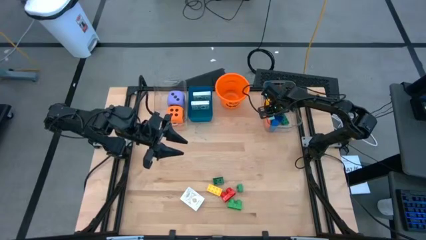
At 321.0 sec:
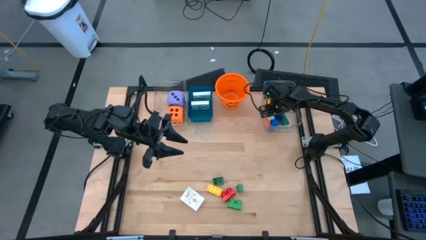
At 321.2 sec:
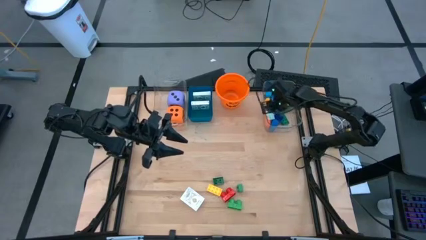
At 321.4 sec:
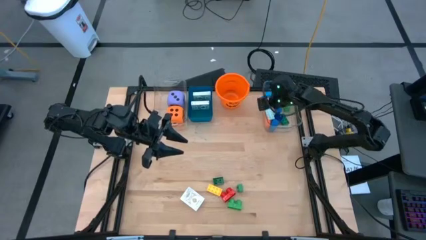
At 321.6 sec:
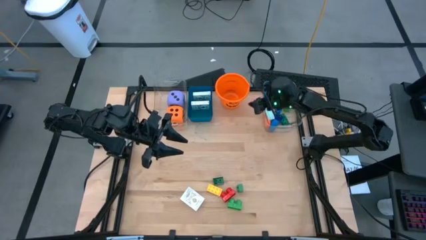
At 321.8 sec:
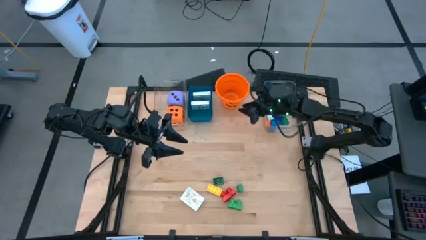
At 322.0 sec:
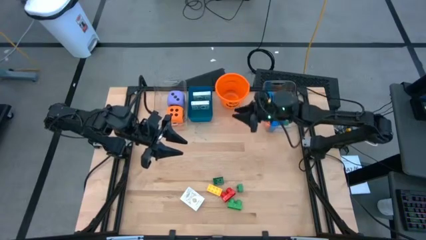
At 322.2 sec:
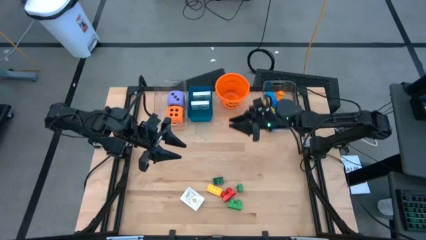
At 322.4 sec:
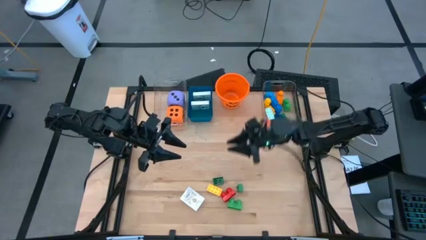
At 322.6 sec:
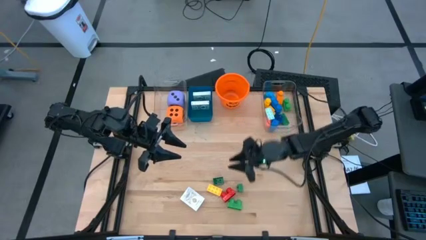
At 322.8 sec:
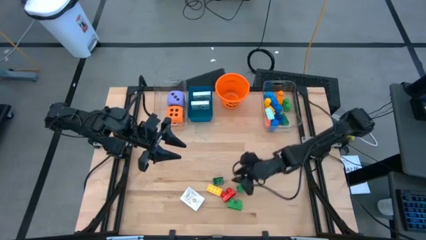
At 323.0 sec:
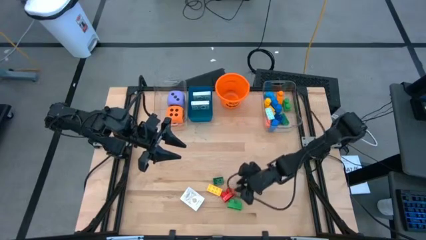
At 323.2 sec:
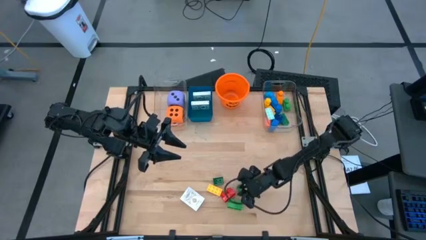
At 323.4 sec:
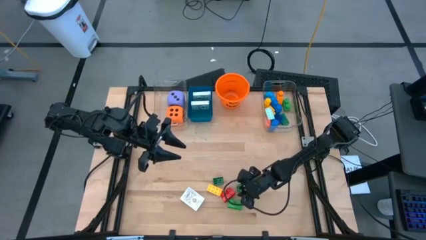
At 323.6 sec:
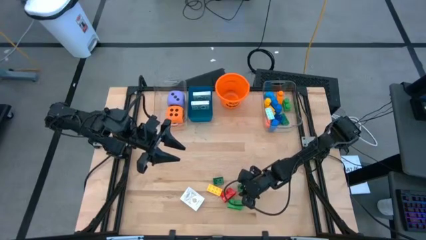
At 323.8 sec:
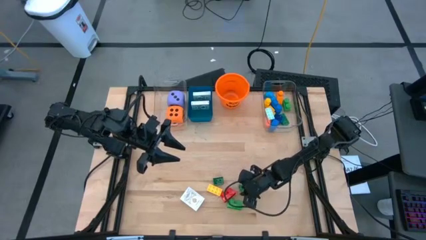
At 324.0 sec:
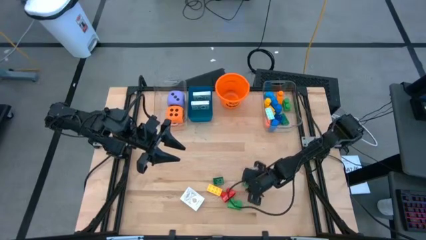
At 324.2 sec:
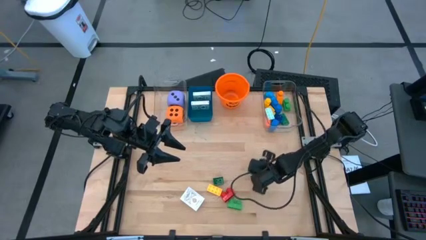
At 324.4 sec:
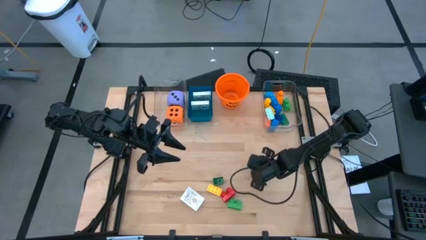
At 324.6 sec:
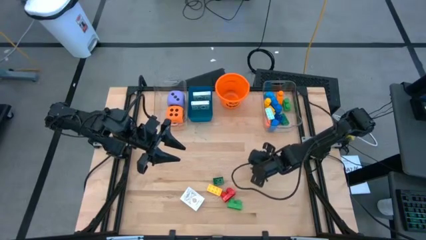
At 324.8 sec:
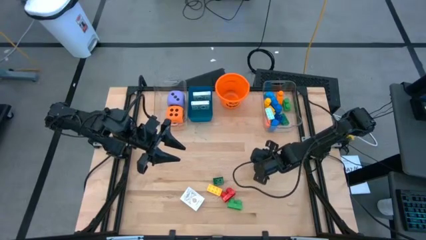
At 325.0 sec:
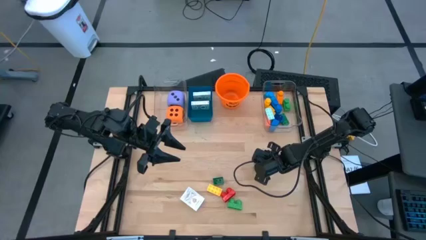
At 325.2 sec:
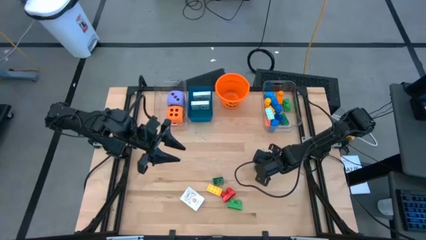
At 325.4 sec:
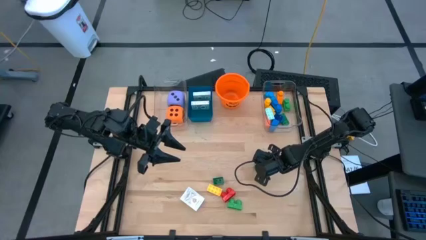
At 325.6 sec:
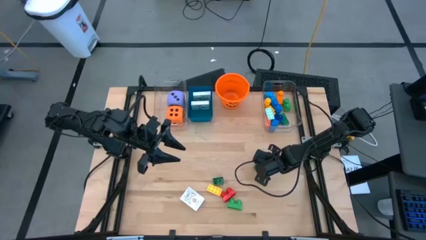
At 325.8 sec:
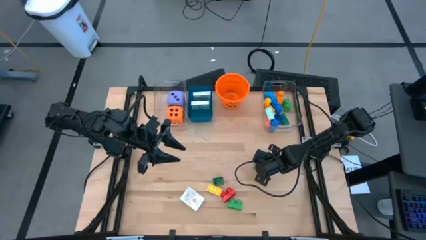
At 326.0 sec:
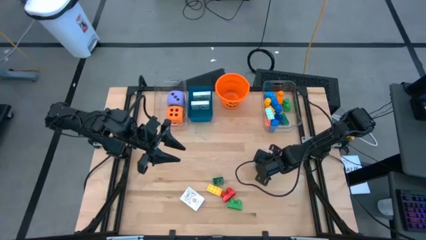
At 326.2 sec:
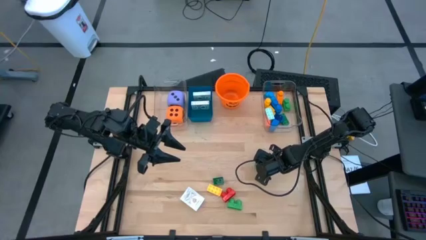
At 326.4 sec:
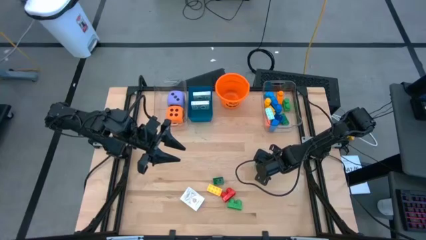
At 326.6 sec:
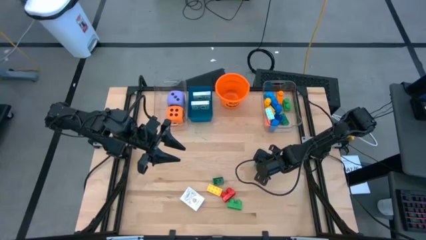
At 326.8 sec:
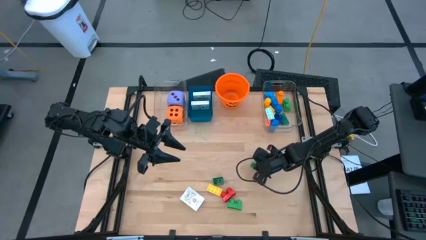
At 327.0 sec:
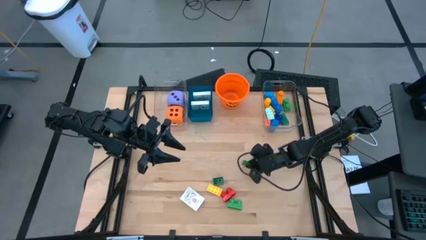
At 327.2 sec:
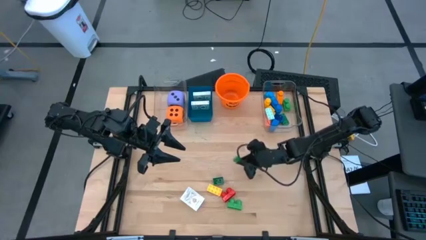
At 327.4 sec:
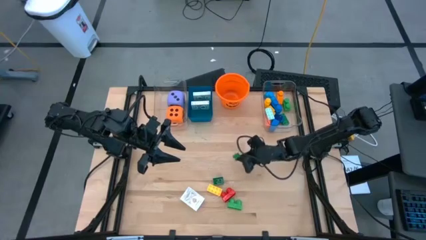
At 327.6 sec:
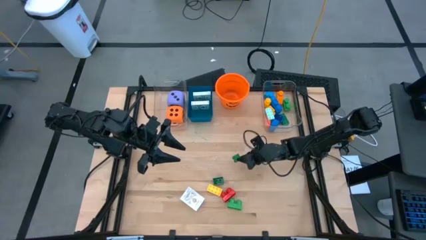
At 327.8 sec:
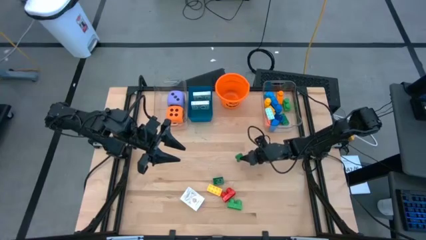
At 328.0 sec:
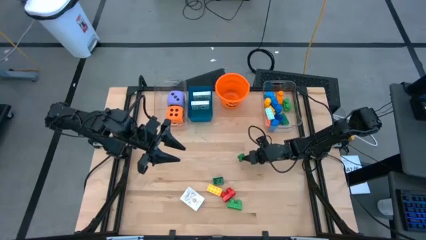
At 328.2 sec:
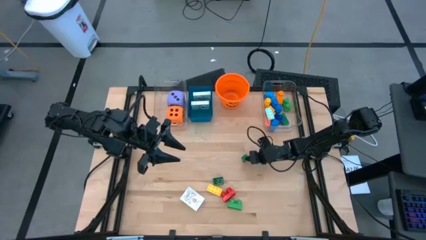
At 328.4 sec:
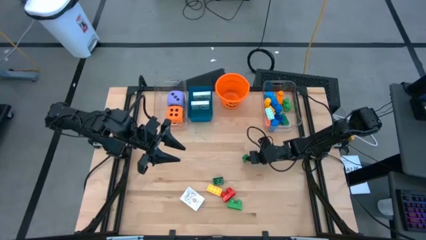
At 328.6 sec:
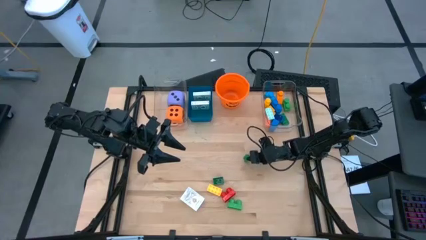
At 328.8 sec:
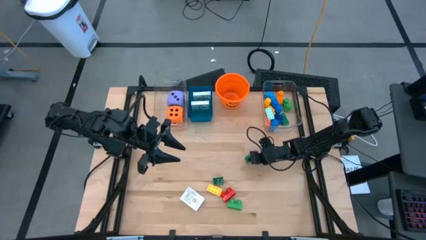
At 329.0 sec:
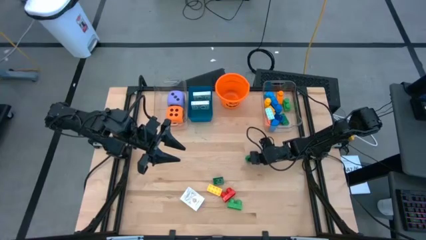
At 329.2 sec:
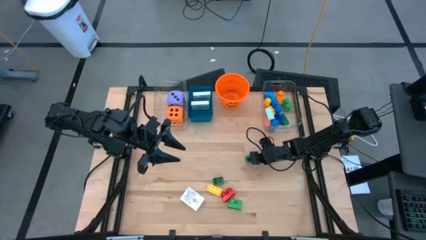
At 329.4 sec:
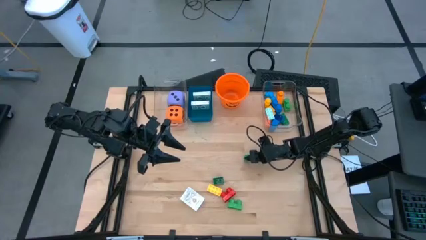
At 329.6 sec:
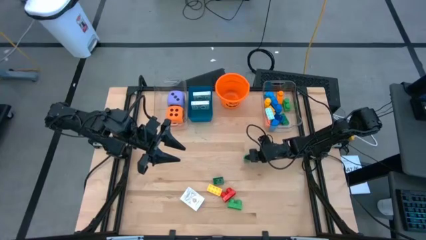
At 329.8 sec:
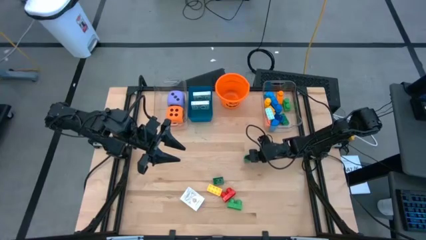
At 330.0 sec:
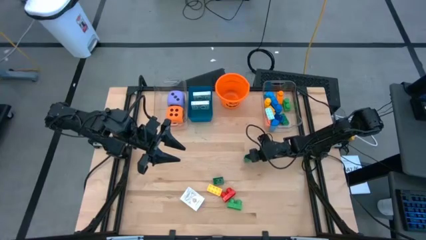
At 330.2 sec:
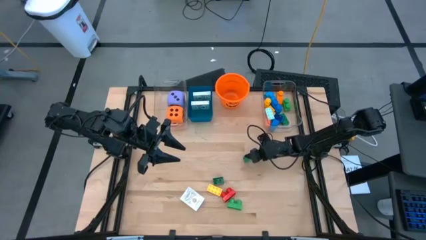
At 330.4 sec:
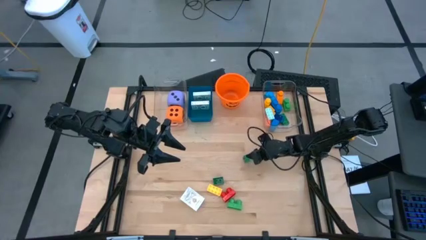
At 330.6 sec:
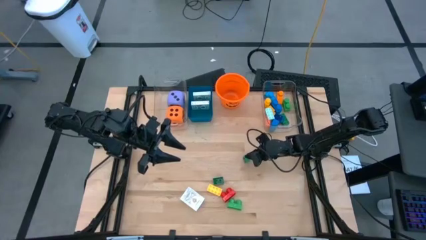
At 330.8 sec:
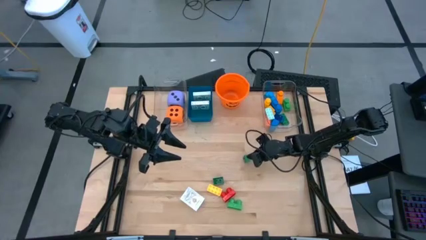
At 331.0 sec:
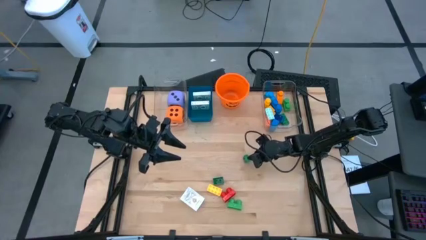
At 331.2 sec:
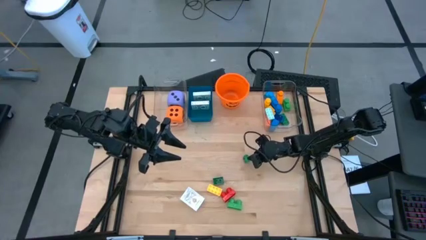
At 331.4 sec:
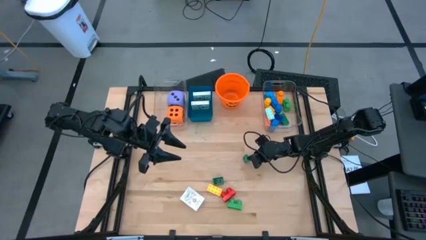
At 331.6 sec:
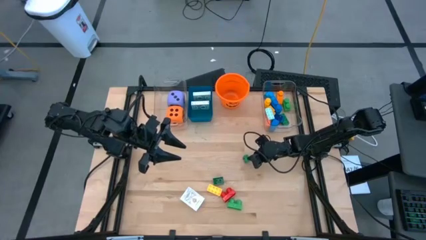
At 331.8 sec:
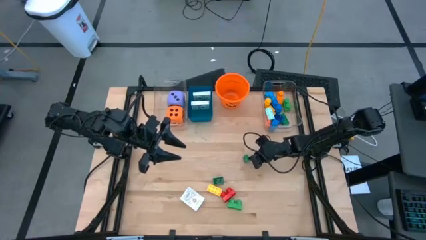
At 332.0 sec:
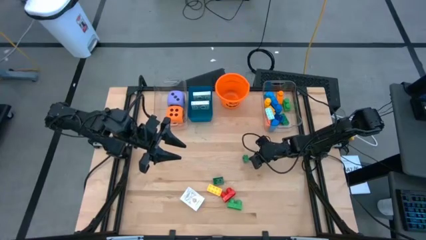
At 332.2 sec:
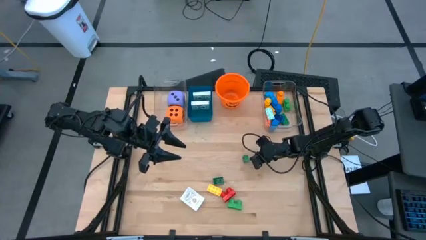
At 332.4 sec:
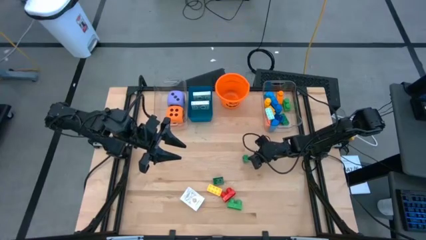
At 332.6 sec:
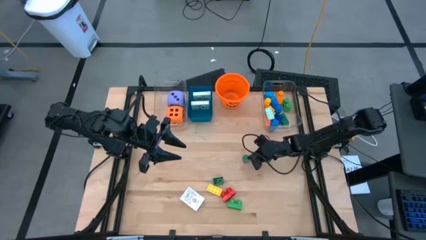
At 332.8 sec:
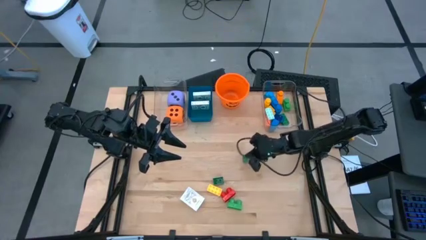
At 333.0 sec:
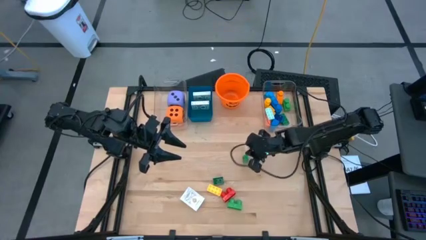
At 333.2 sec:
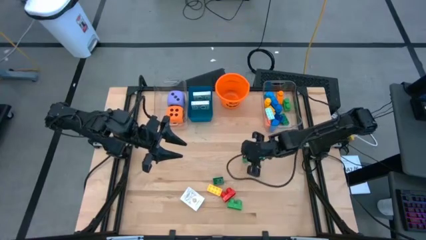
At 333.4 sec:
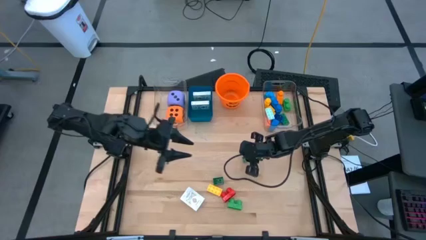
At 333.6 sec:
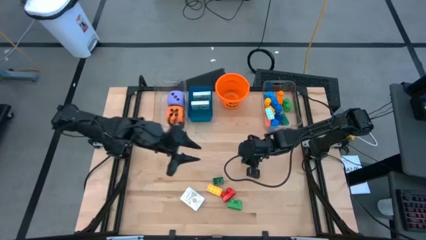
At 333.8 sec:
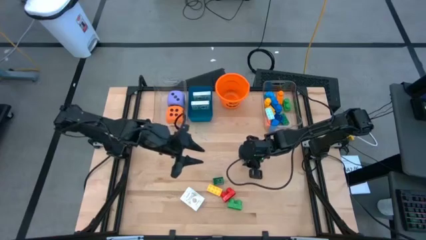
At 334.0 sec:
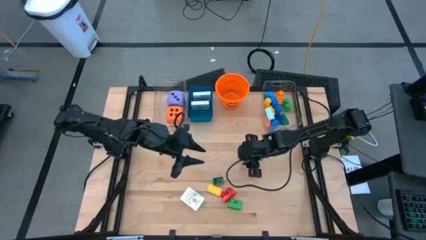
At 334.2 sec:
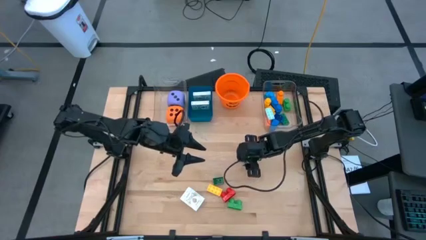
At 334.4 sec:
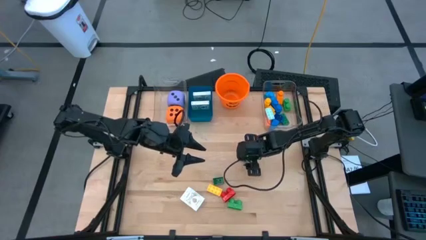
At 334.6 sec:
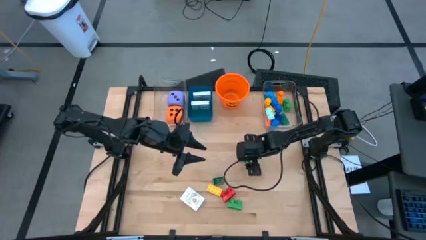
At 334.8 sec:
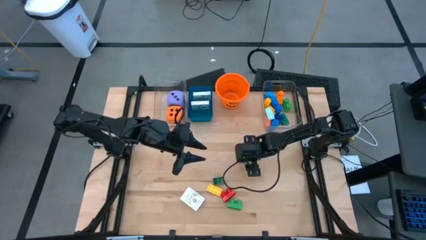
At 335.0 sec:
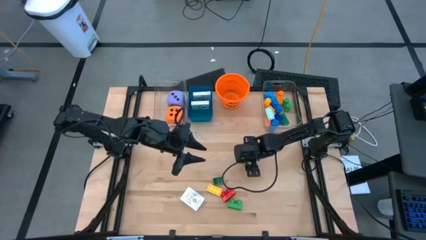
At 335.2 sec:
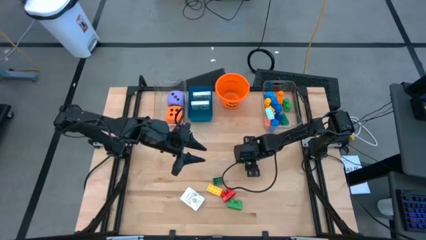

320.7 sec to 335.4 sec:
Task: Pick & Place Toys
Put the green game piece into the right transparent bin
